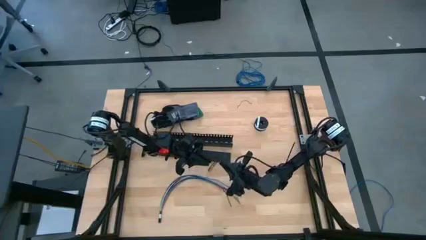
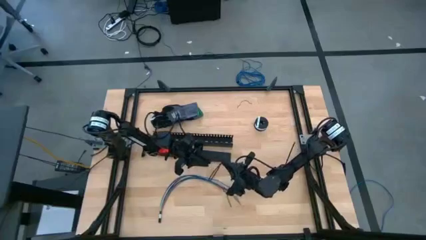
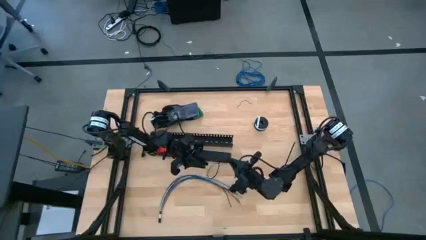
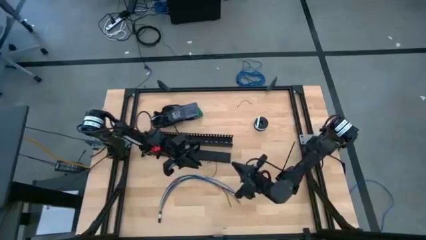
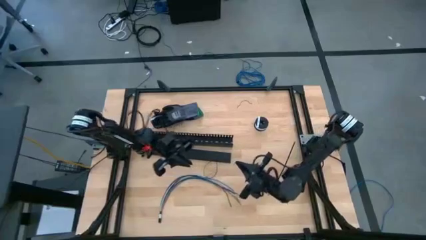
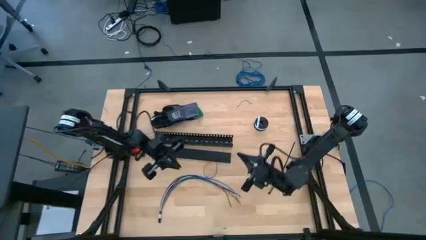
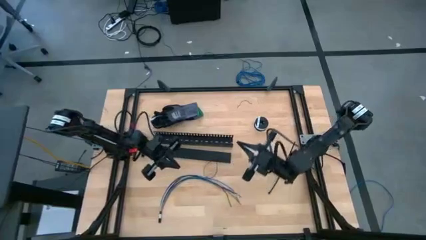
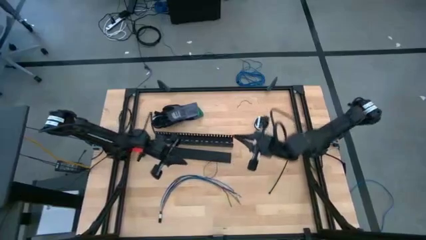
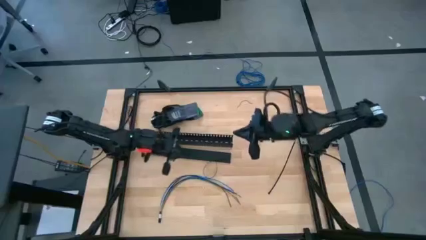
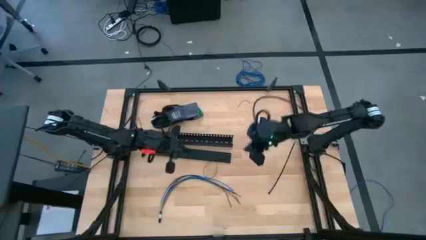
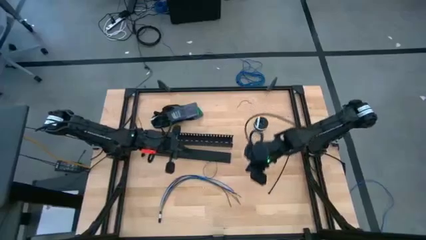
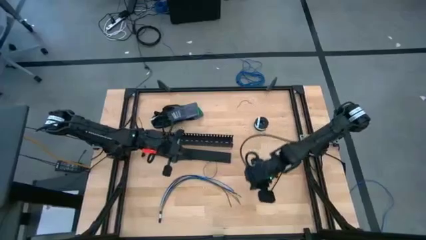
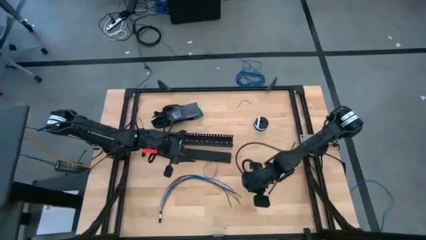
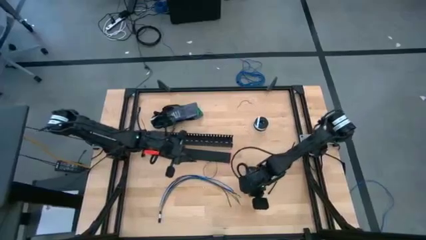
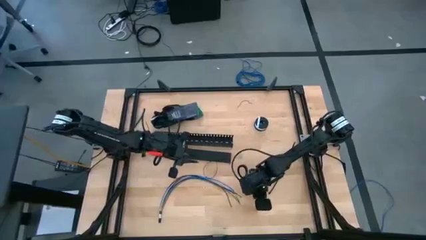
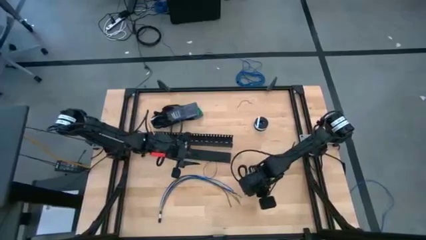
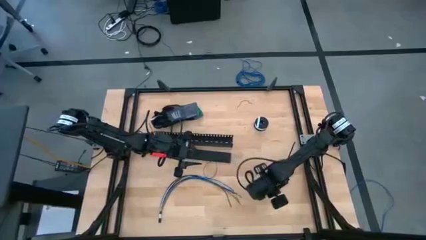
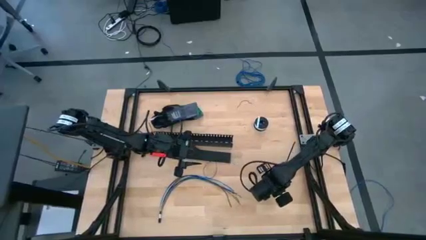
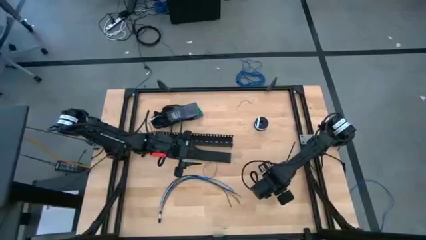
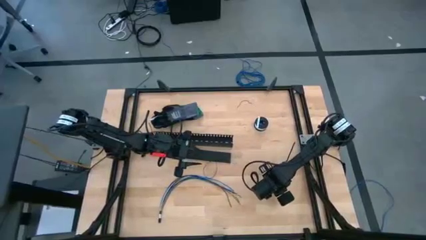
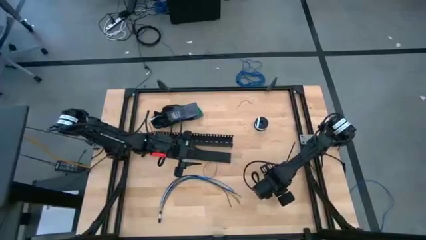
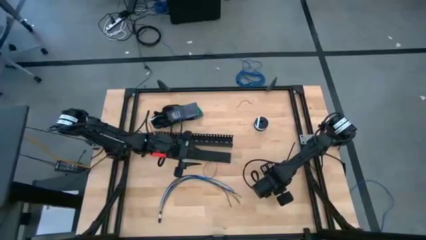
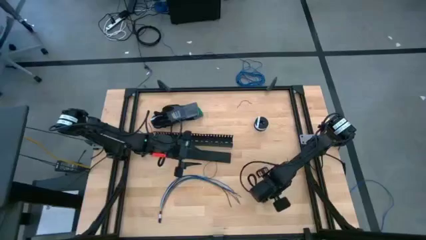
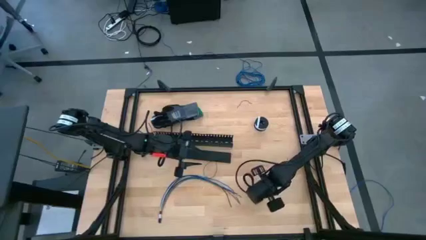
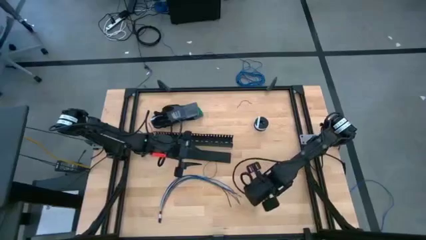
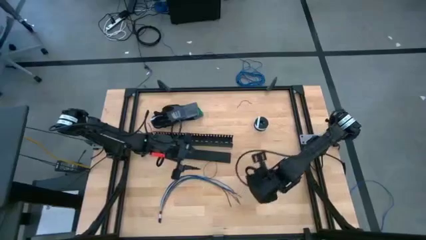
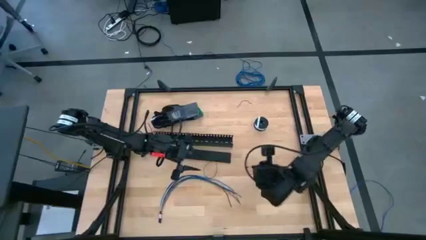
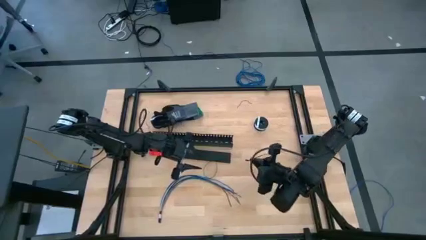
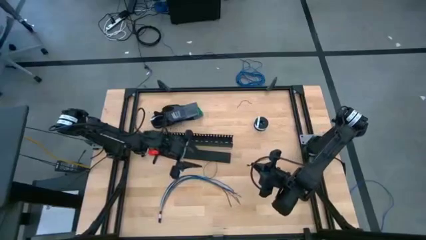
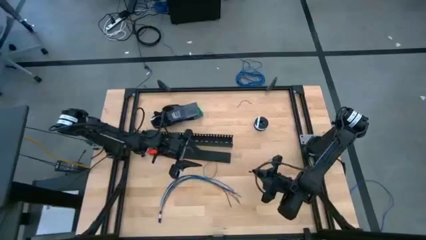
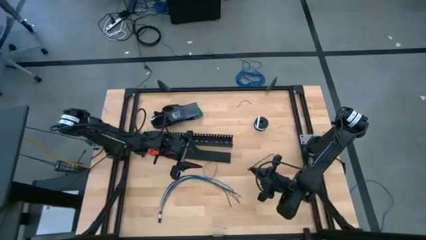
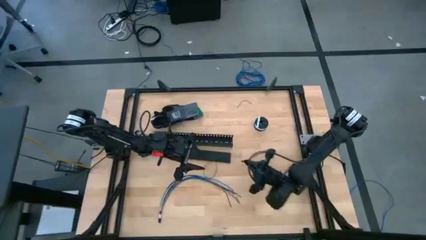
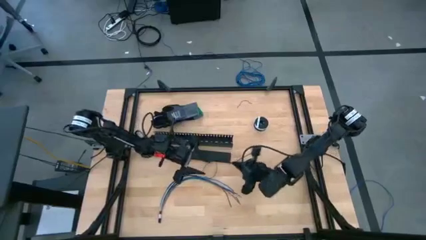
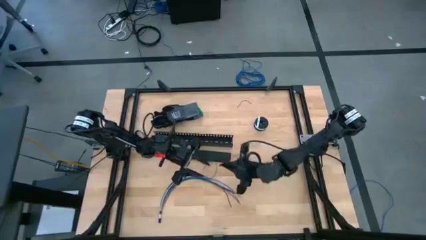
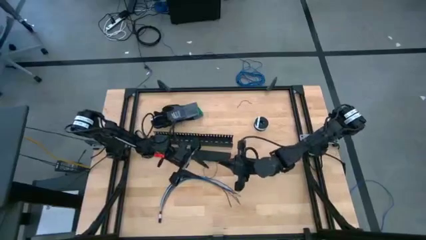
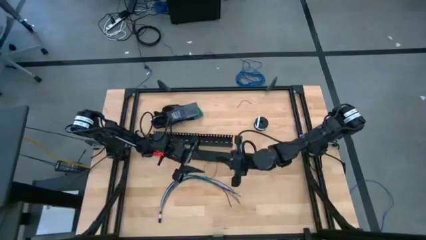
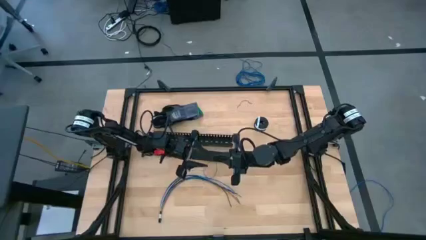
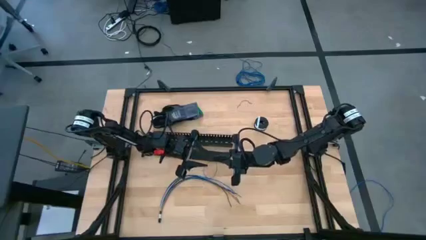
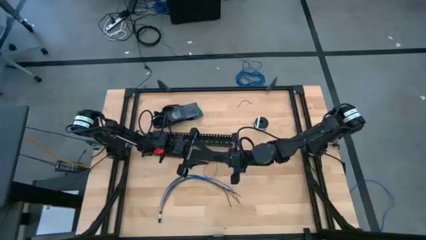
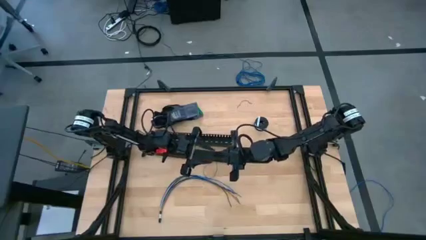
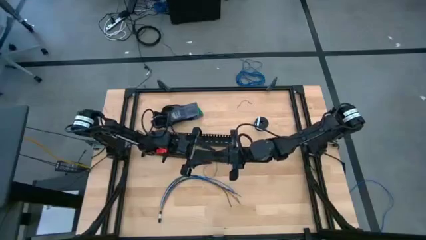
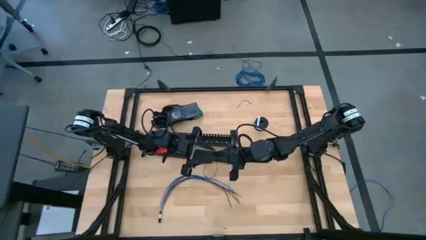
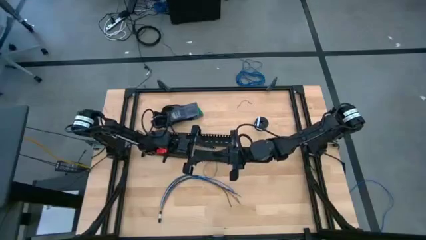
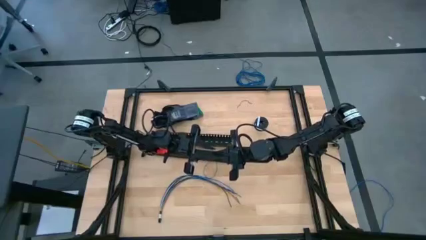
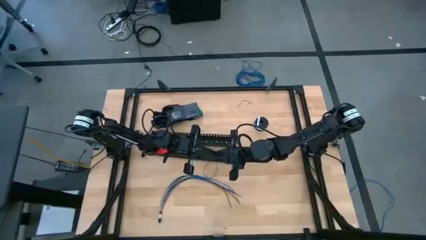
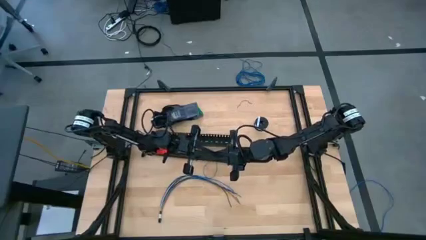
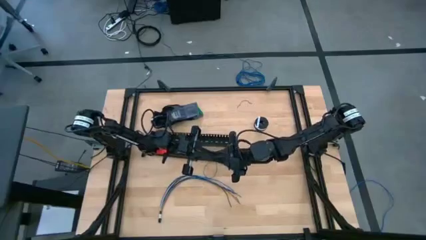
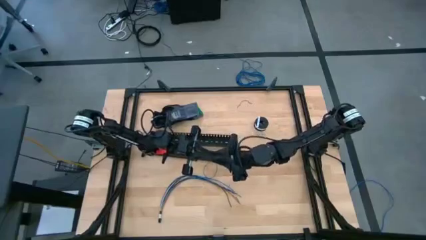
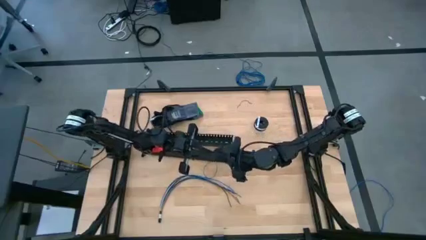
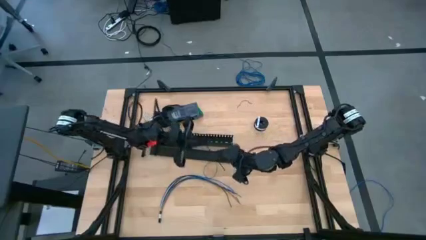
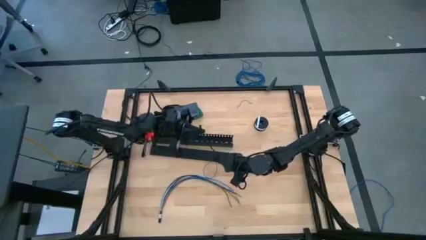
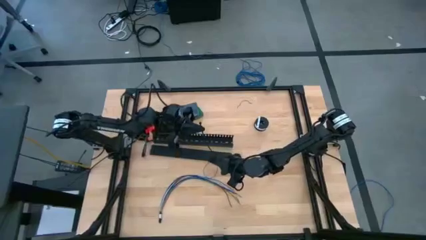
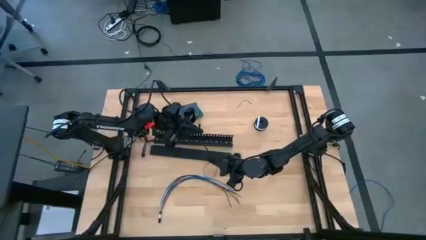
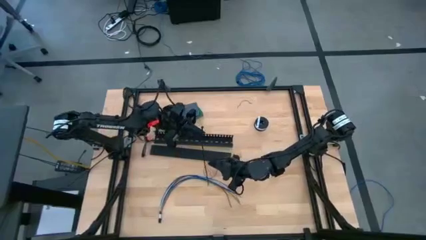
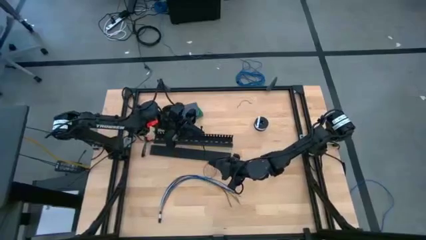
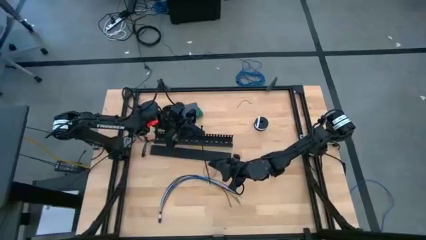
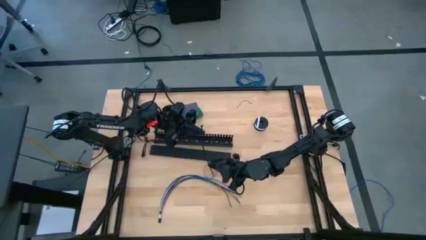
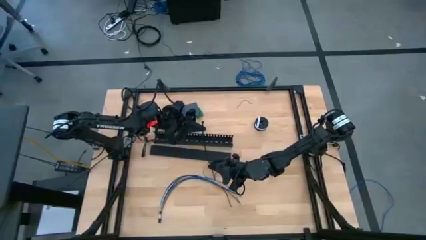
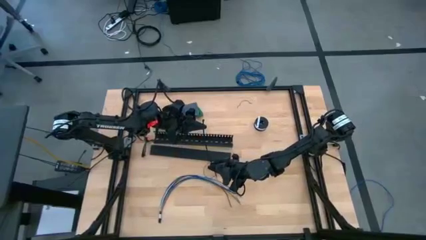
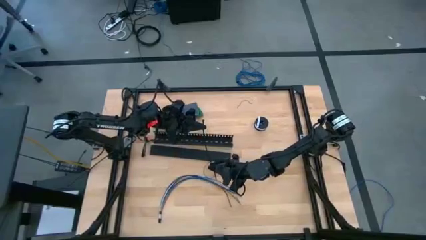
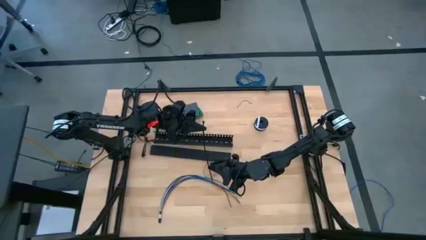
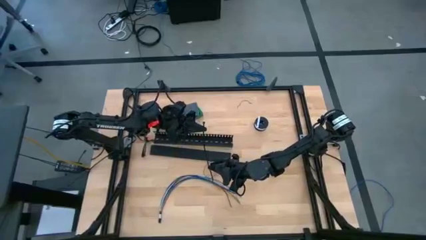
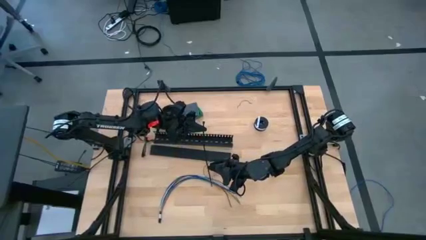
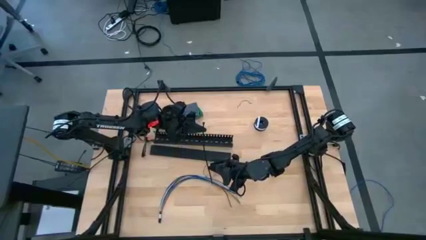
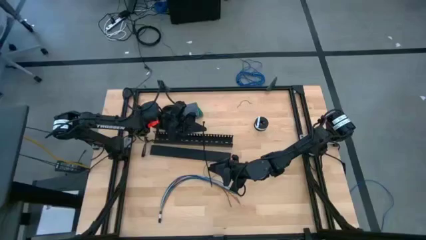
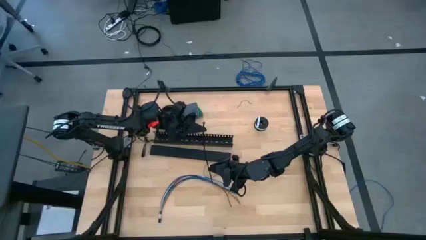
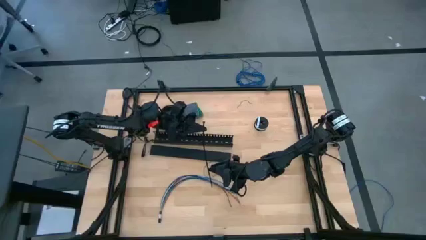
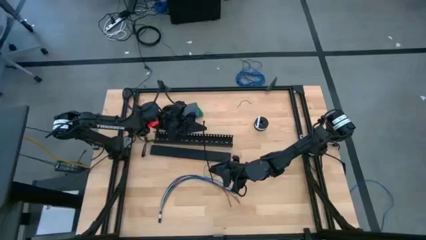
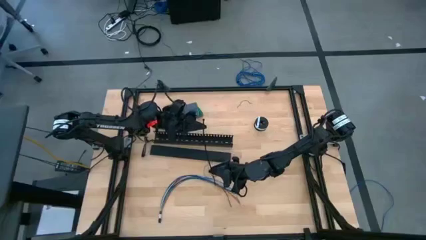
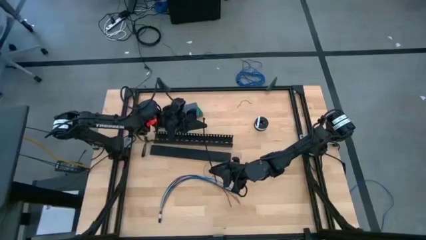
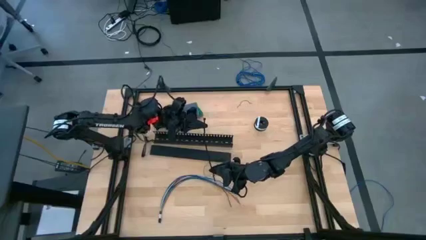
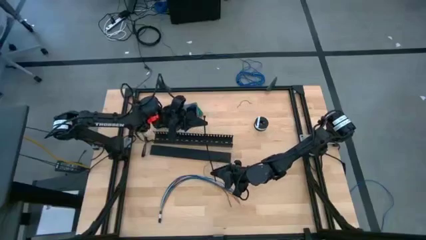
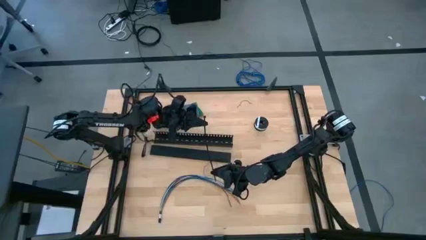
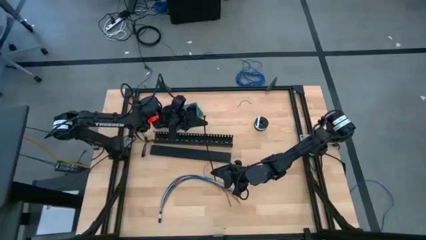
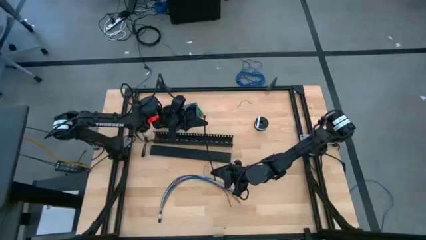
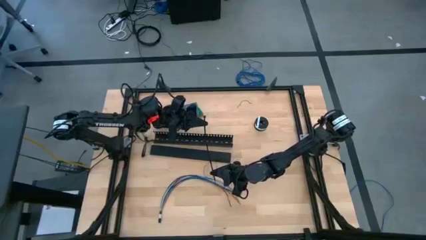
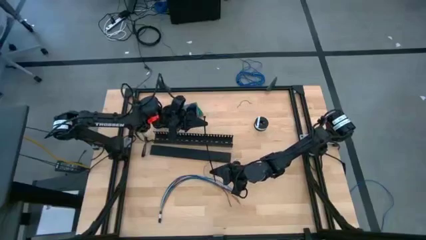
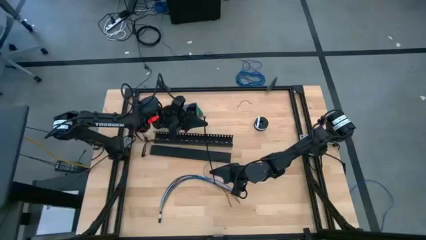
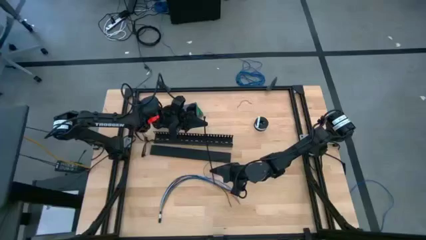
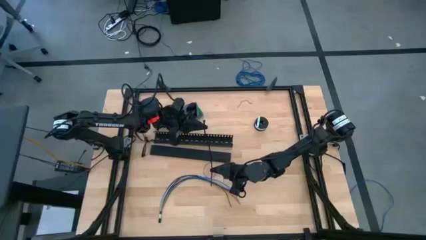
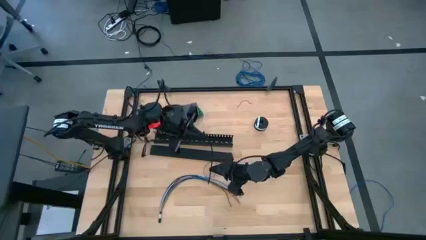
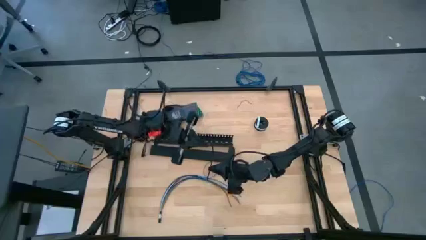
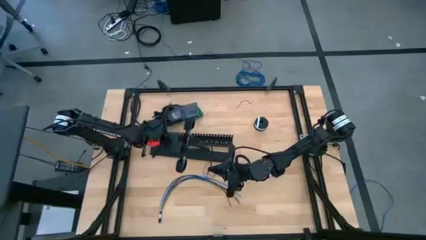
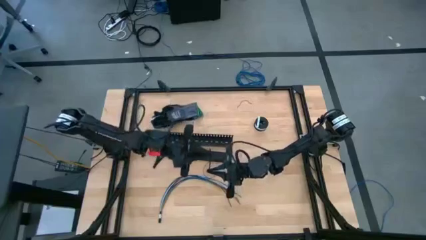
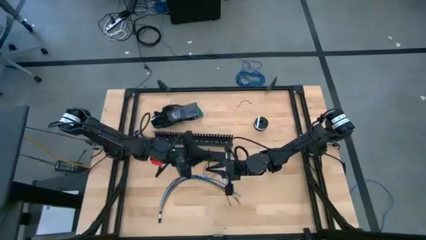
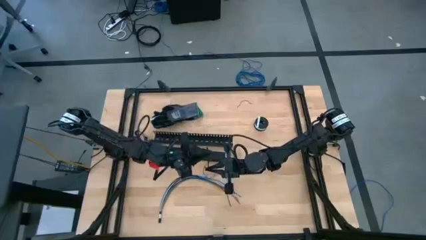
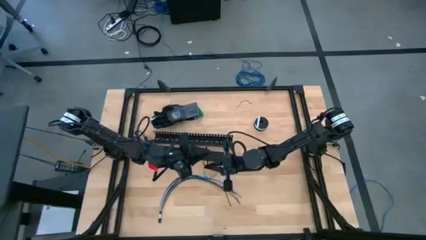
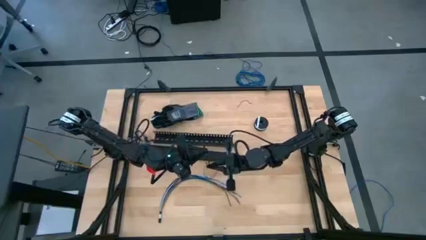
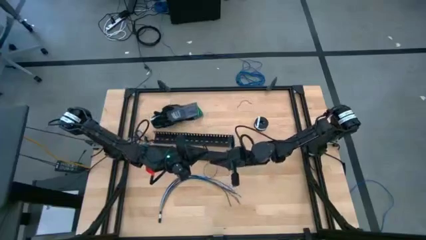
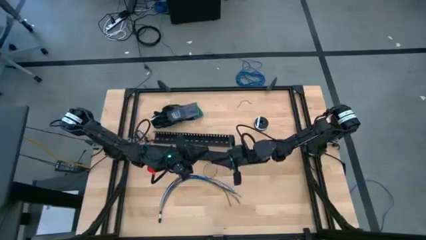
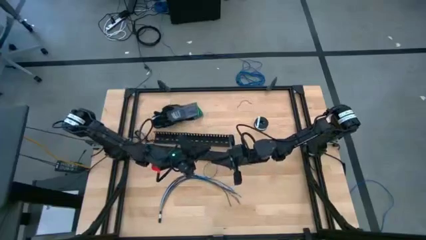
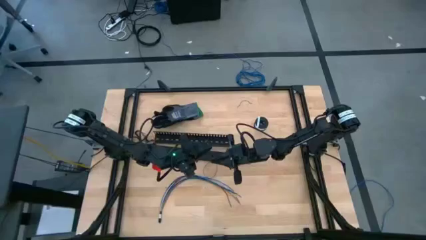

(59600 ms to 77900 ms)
Task: Ziptie cables
Wrap the right black zip tie on the cables
